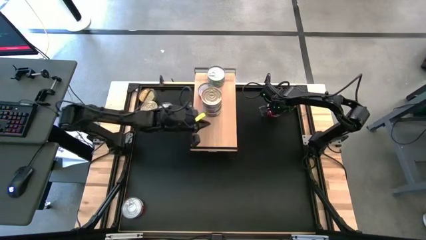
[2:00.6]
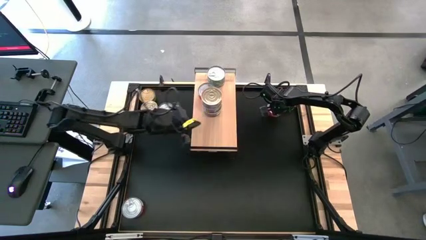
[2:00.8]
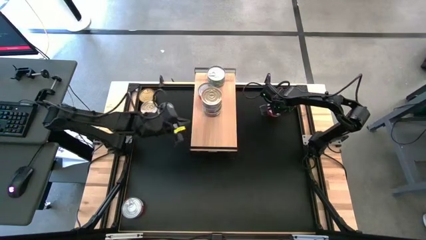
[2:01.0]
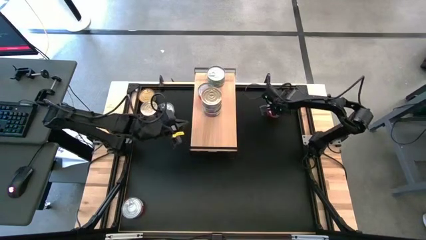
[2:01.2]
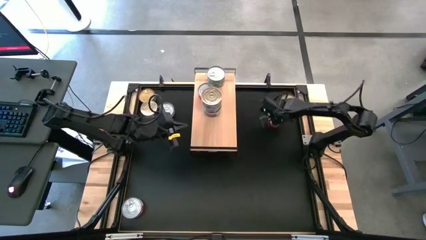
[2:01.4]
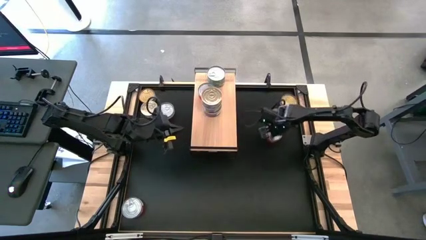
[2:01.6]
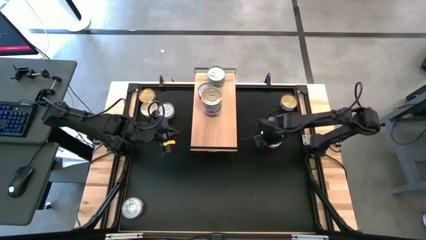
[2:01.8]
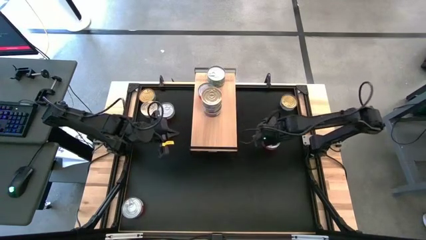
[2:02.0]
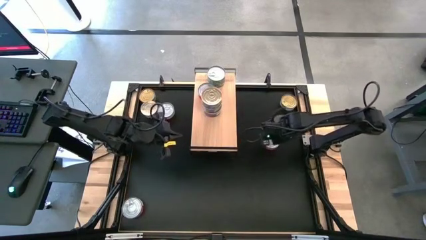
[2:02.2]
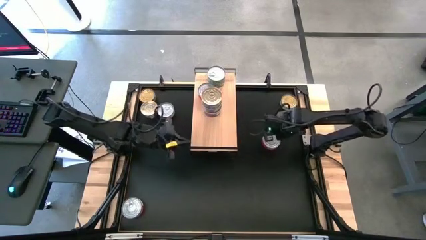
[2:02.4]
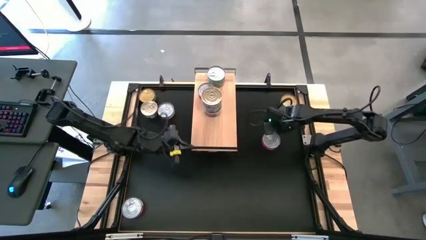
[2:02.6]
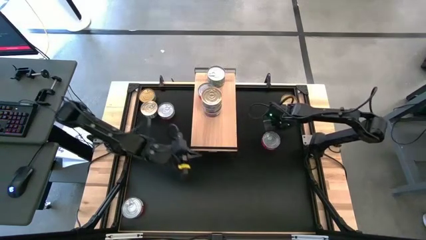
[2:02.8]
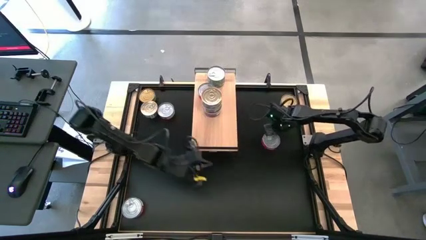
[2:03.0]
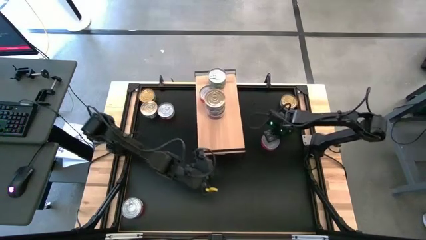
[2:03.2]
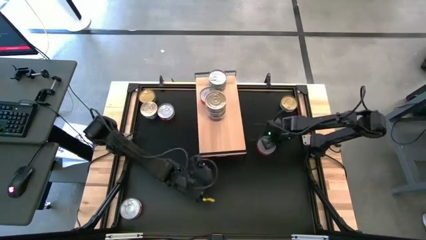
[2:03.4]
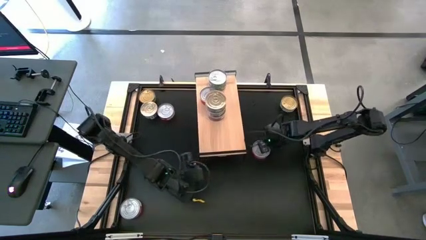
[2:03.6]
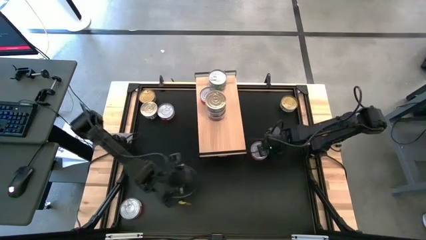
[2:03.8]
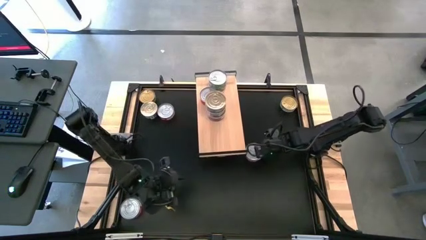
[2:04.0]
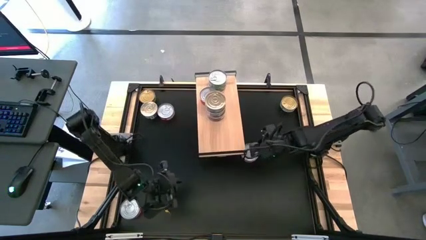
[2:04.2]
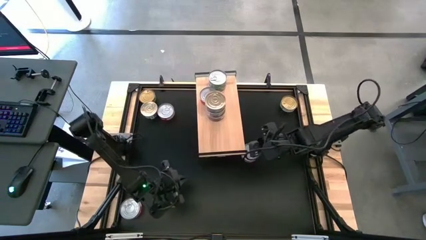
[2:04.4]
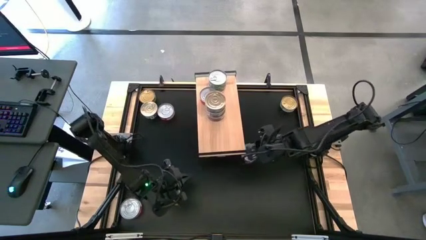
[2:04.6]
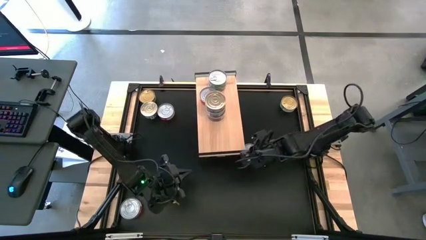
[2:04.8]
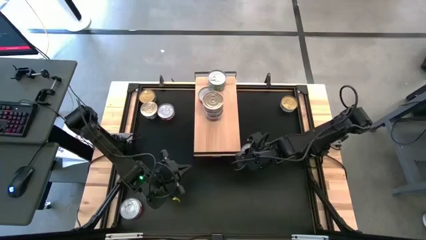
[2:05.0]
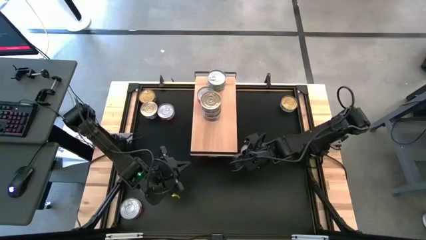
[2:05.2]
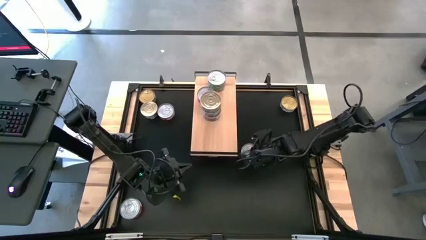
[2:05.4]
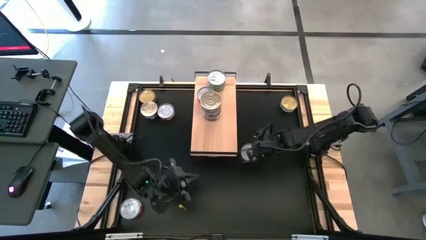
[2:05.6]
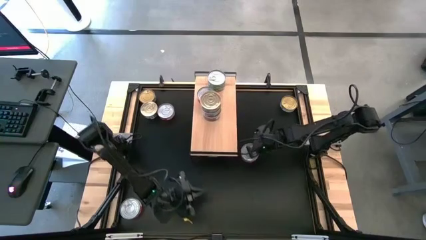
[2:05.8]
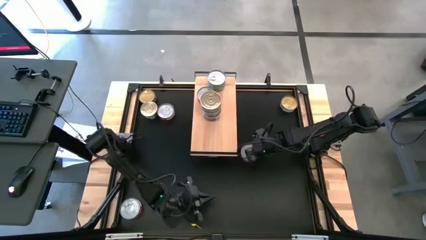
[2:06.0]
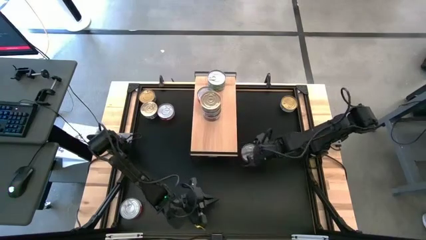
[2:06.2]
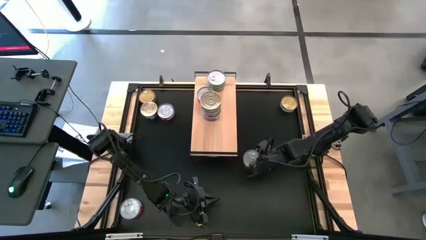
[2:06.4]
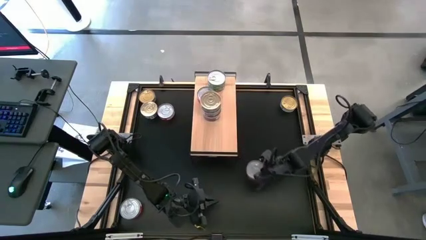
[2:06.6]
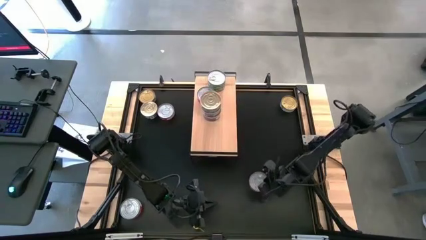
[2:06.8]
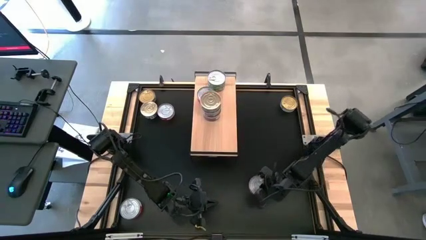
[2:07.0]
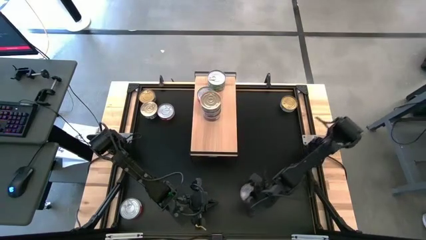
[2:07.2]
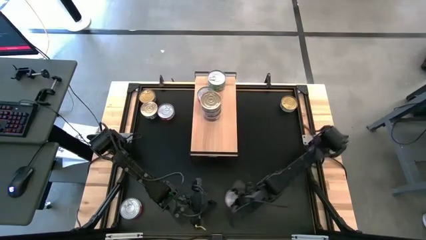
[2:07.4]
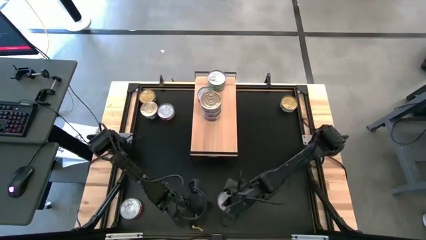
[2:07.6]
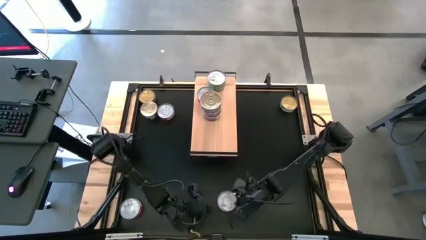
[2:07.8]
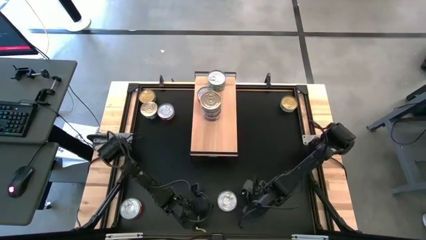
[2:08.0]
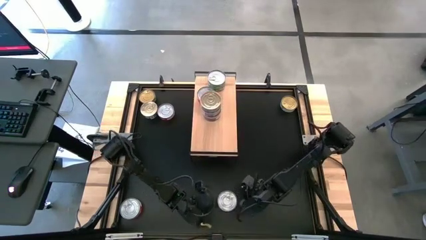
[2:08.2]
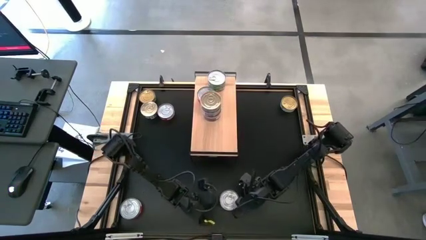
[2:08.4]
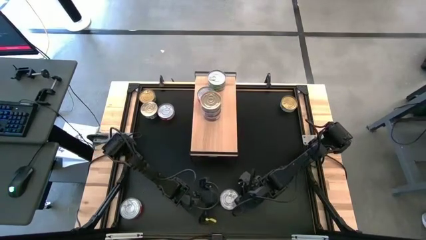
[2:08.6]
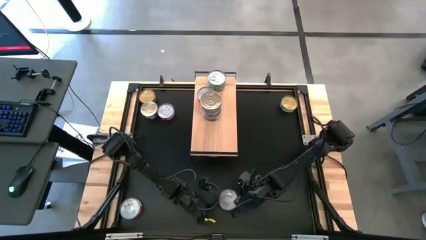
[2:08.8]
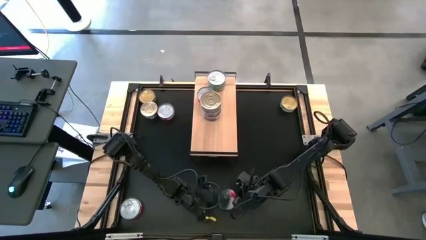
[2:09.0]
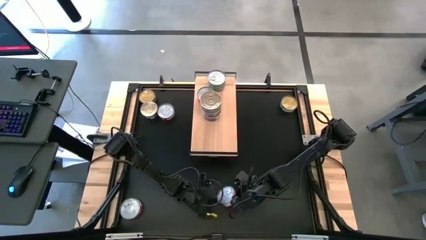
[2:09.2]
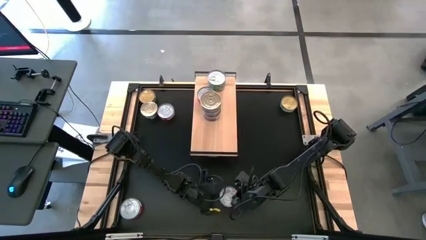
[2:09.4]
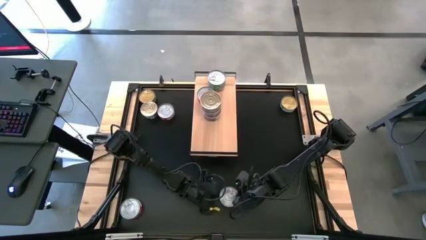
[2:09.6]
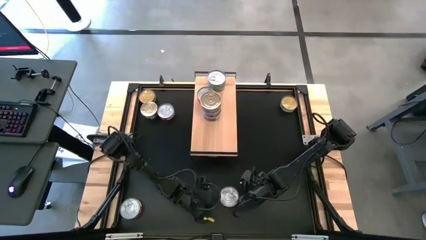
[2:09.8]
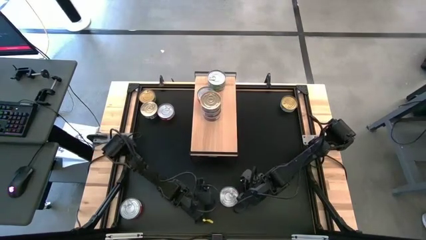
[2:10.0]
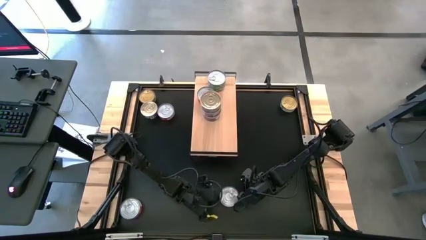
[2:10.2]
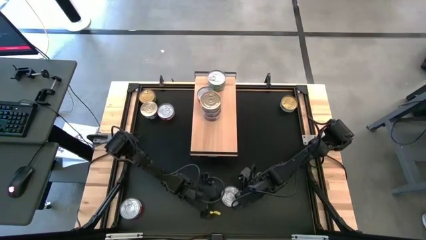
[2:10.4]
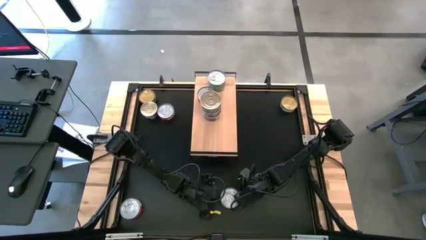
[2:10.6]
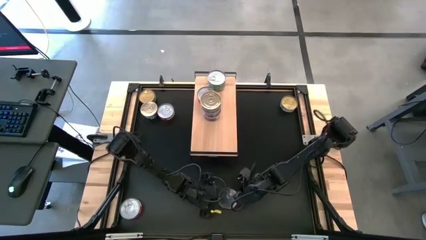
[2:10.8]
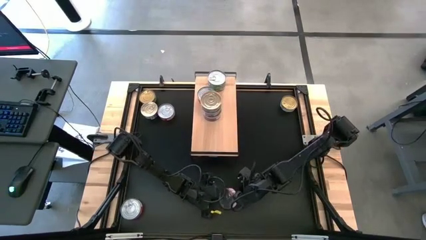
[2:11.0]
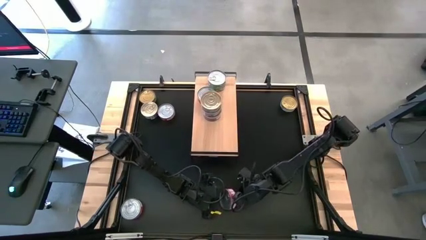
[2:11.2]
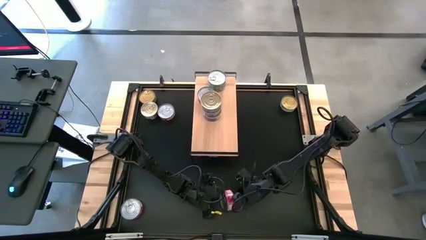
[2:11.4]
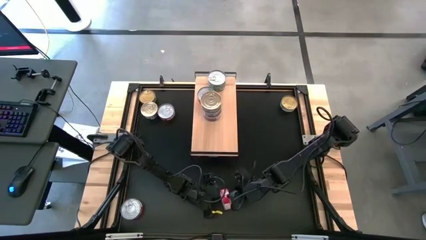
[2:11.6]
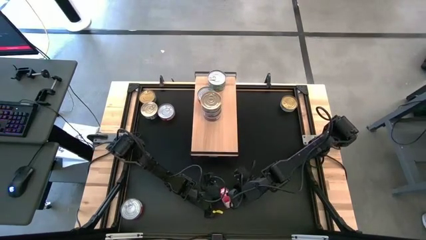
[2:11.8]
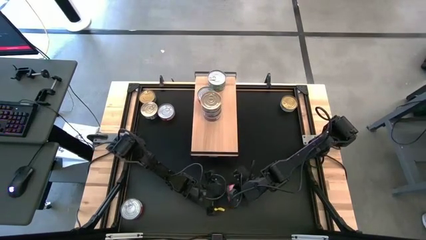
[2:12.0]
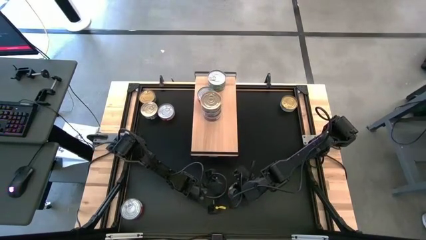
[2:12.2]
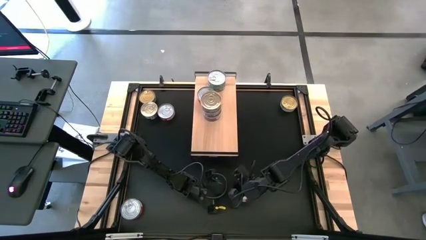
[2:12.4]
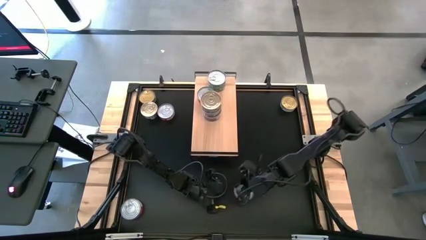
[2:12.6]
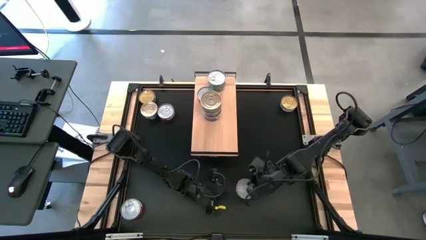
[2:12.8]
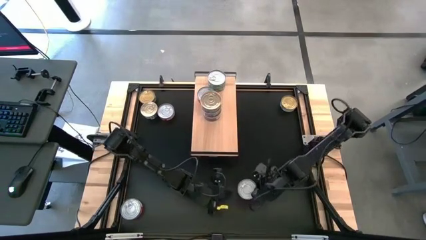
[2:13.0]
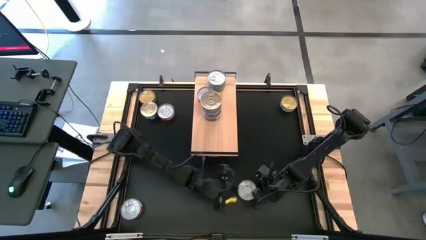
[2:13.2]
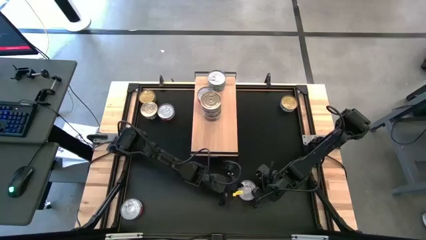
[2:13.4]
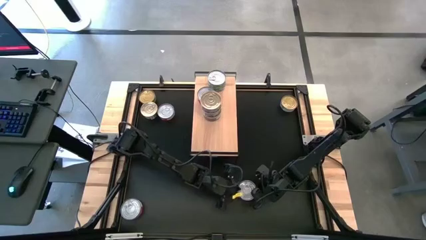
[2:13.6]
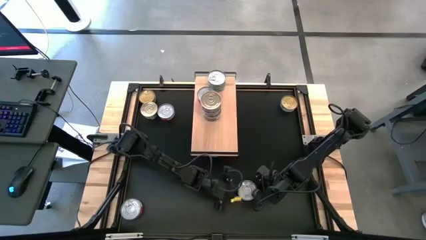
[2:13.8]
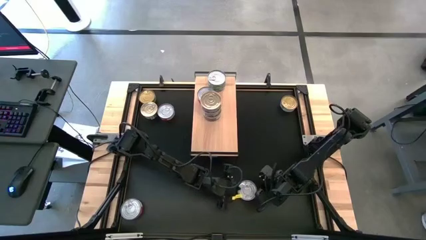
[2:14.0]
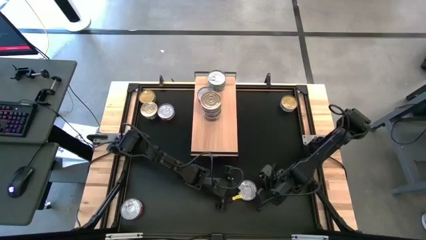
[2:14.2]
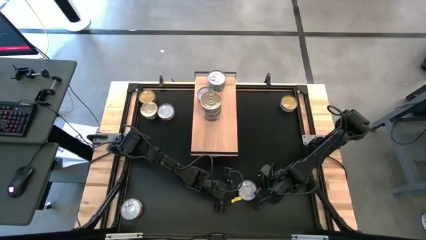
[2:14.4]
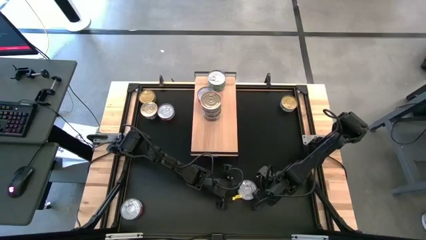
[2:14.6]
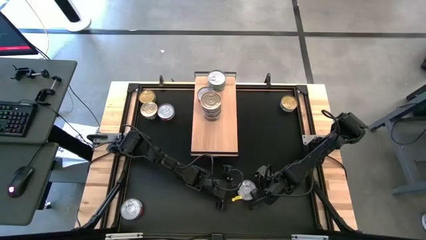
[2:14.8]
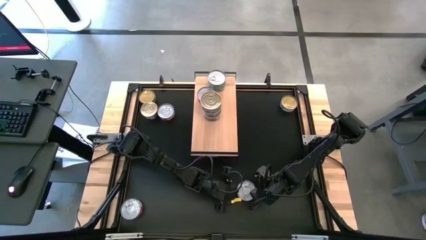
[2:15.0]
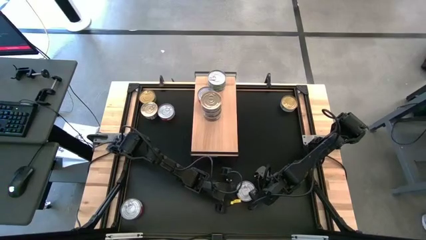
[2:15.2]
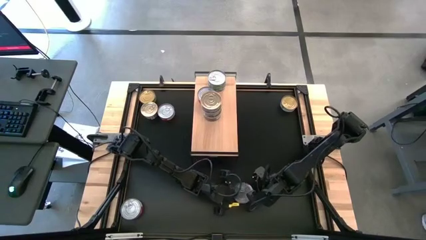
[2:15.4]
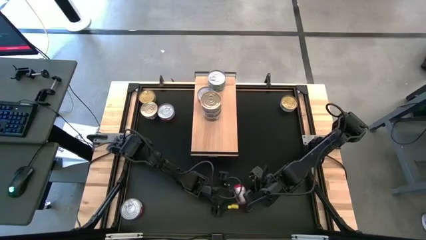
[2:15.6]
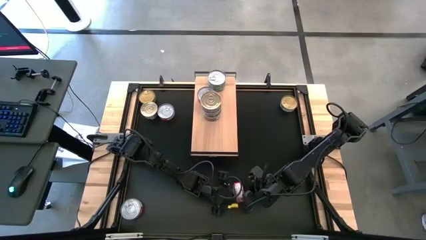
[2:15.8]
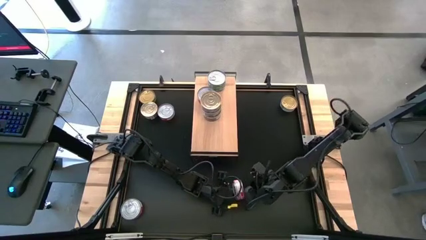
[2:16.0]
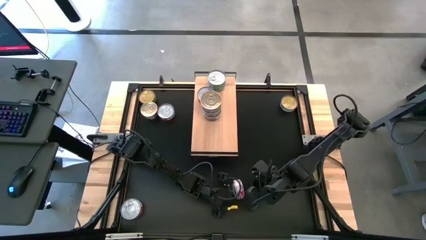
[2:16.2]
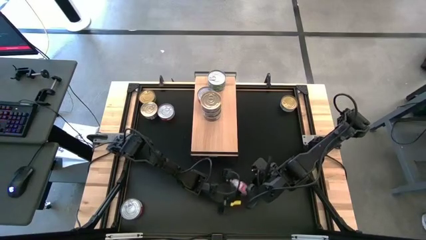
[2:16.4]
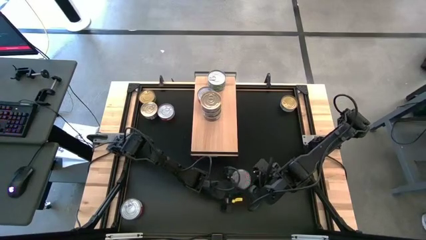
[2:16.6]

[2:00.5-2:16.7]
Task: Stack canned seafood by type on shelf
Stack the red tuna can on top of the red tuna can on the shelf
